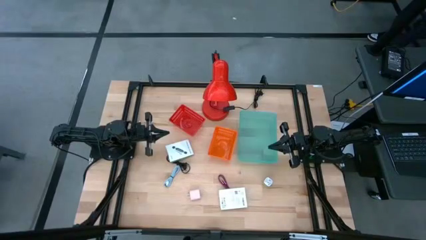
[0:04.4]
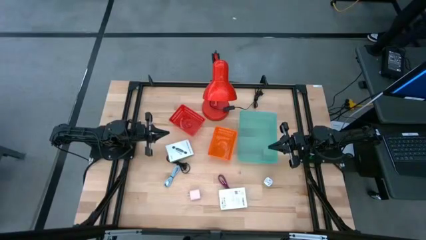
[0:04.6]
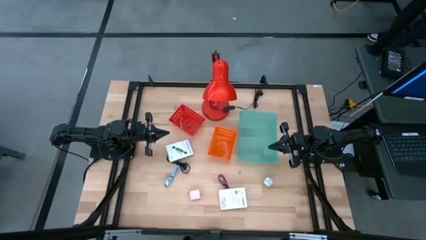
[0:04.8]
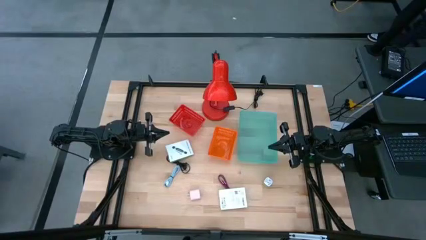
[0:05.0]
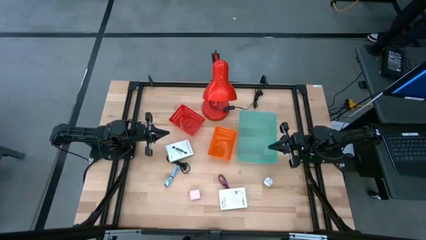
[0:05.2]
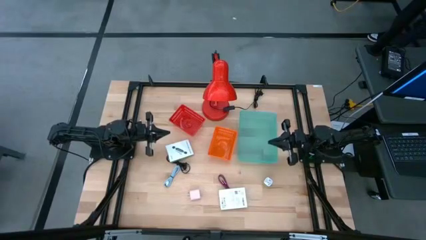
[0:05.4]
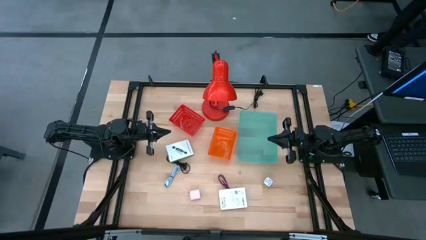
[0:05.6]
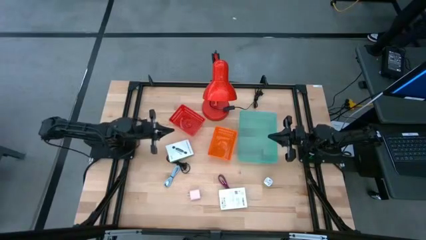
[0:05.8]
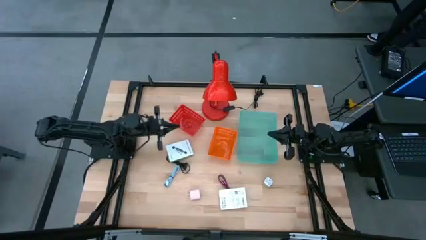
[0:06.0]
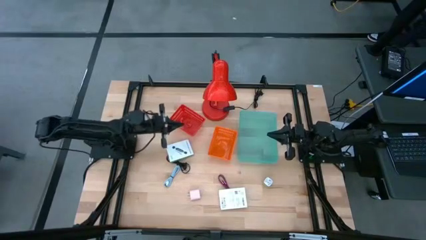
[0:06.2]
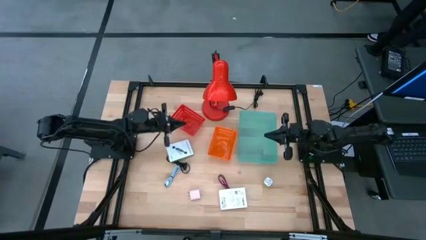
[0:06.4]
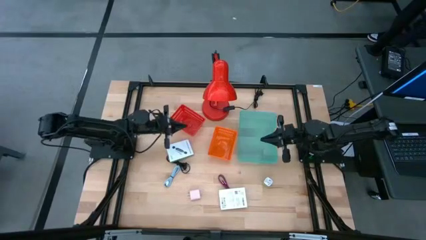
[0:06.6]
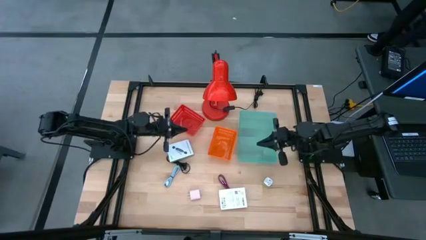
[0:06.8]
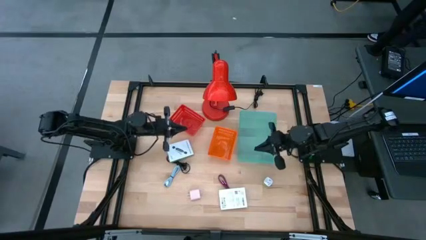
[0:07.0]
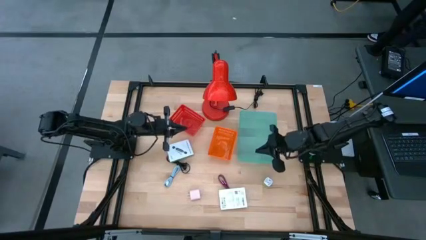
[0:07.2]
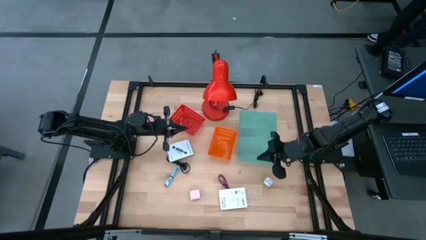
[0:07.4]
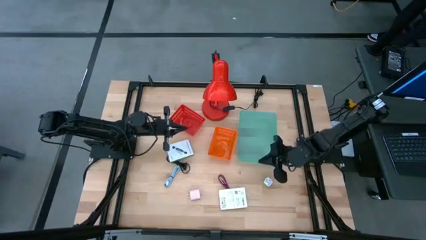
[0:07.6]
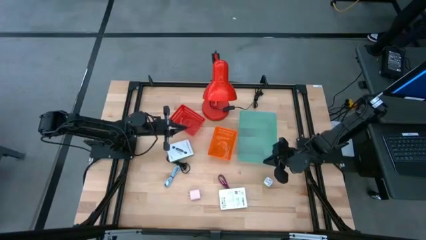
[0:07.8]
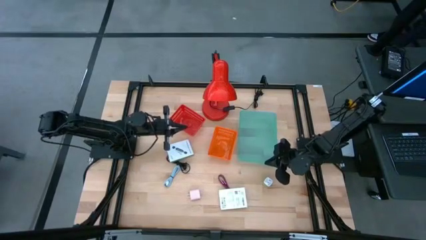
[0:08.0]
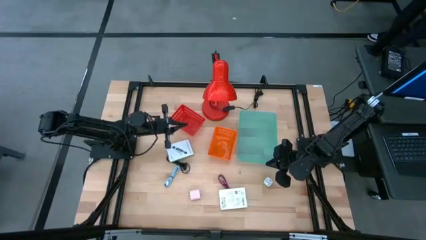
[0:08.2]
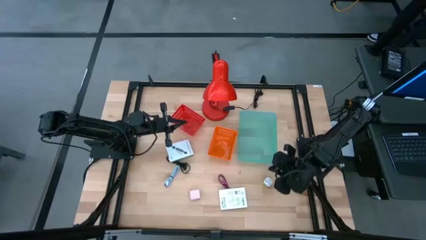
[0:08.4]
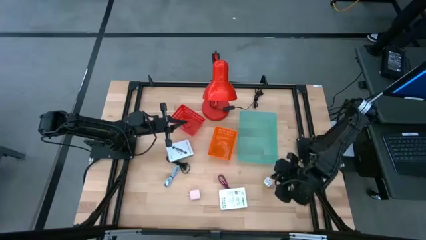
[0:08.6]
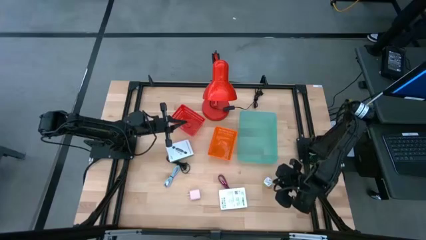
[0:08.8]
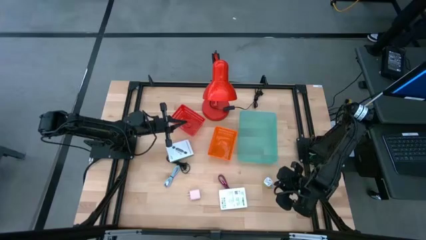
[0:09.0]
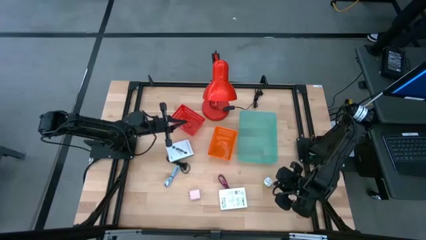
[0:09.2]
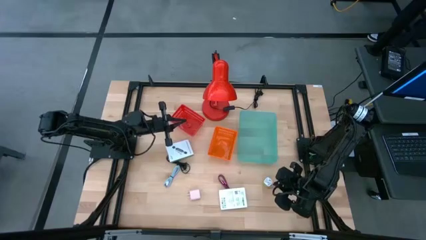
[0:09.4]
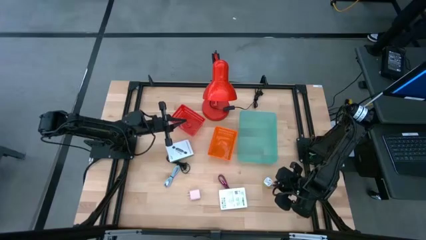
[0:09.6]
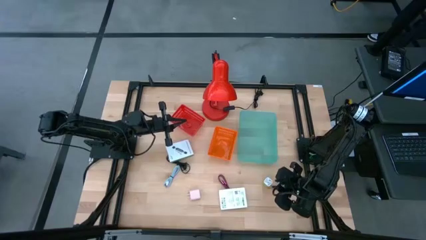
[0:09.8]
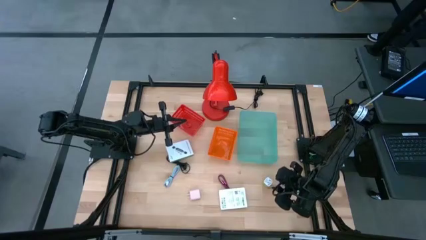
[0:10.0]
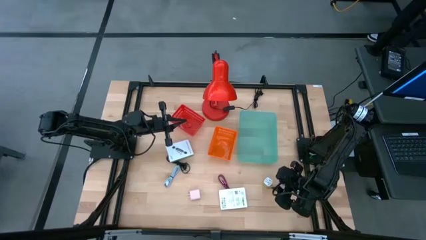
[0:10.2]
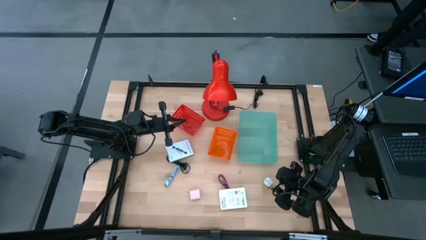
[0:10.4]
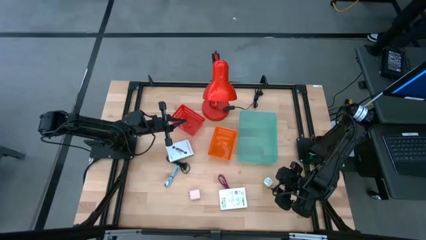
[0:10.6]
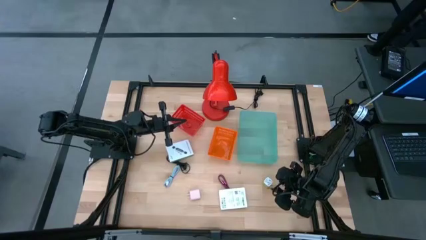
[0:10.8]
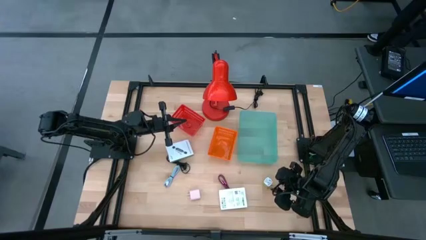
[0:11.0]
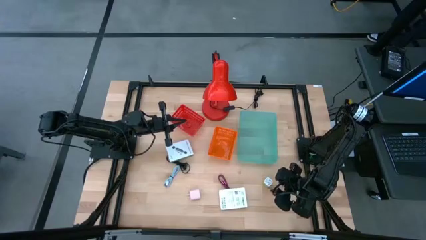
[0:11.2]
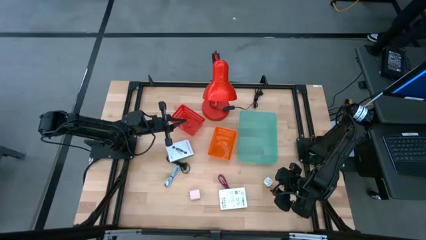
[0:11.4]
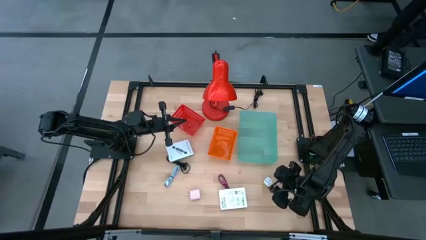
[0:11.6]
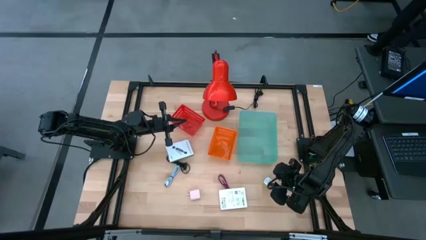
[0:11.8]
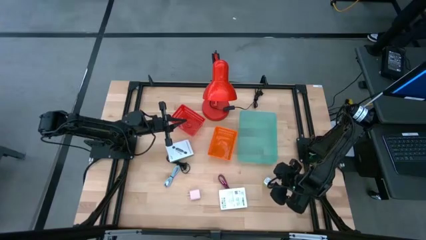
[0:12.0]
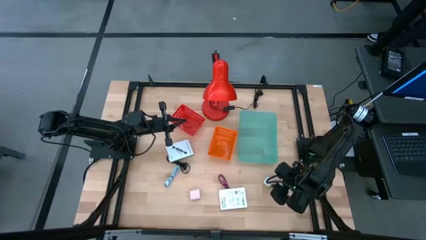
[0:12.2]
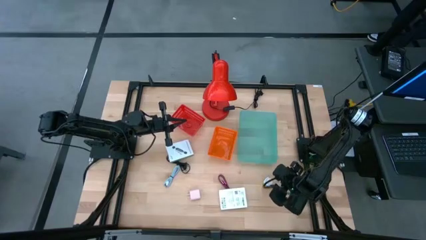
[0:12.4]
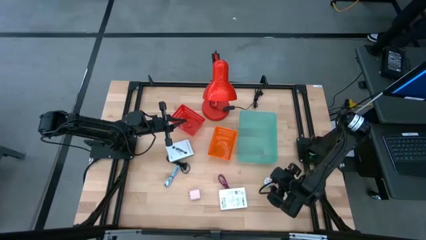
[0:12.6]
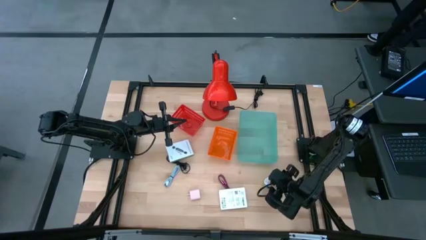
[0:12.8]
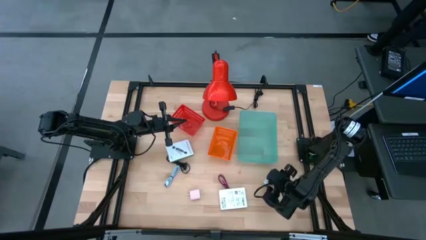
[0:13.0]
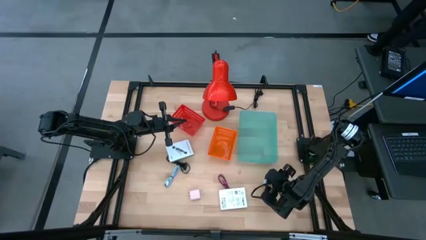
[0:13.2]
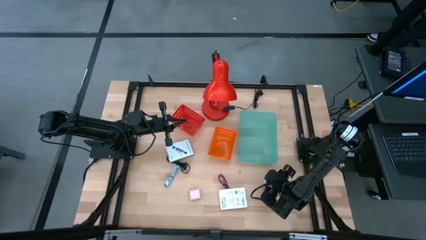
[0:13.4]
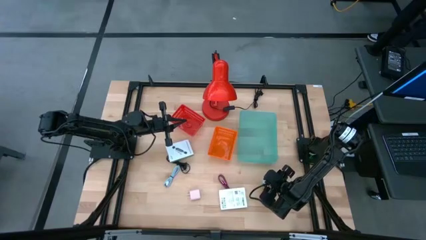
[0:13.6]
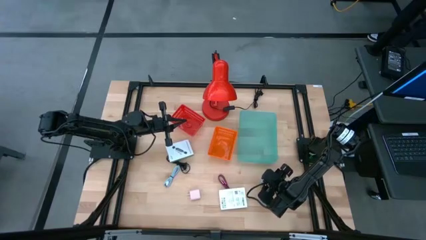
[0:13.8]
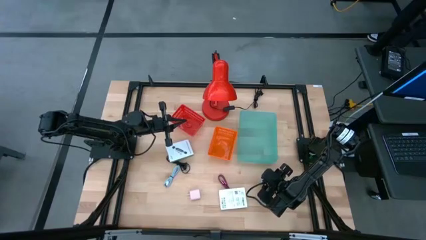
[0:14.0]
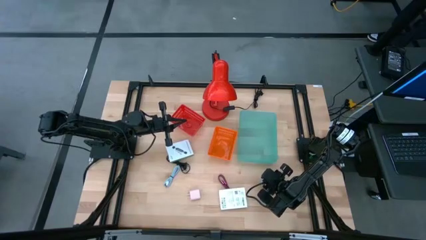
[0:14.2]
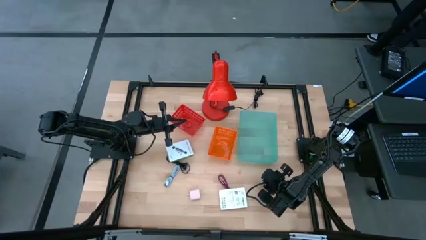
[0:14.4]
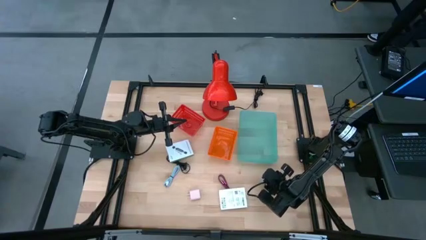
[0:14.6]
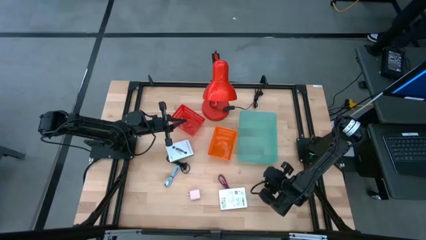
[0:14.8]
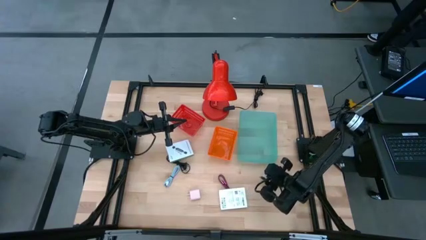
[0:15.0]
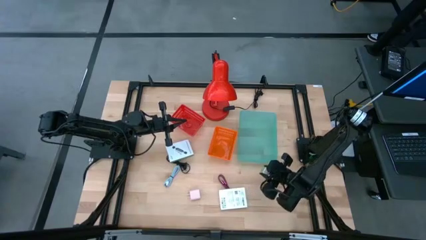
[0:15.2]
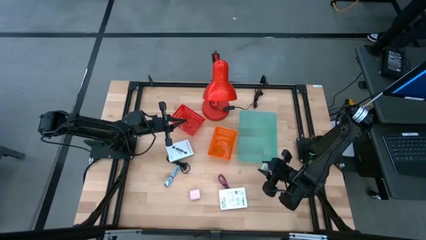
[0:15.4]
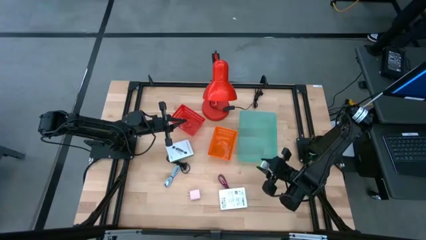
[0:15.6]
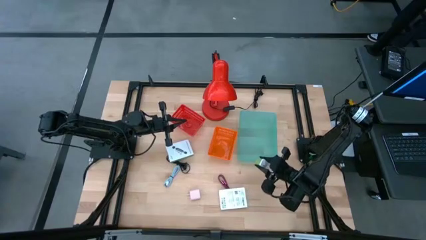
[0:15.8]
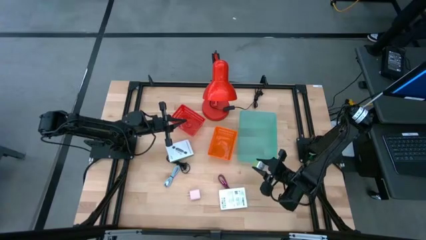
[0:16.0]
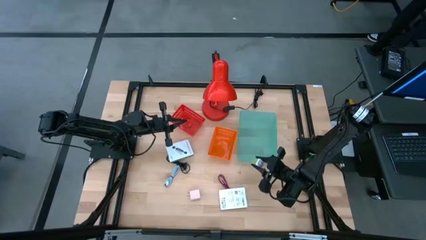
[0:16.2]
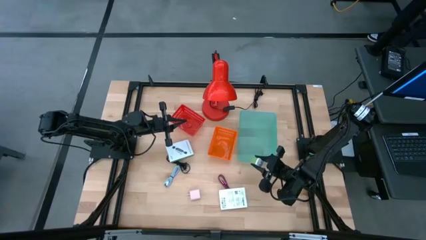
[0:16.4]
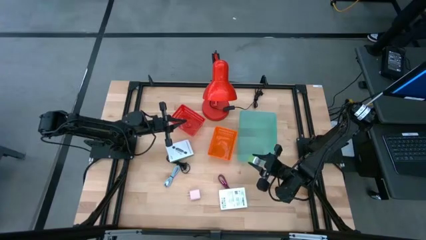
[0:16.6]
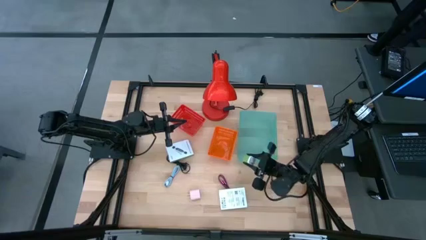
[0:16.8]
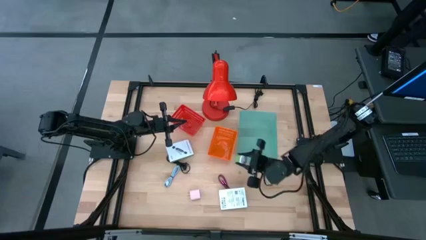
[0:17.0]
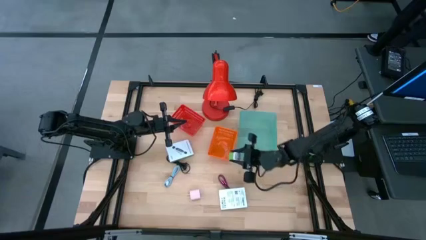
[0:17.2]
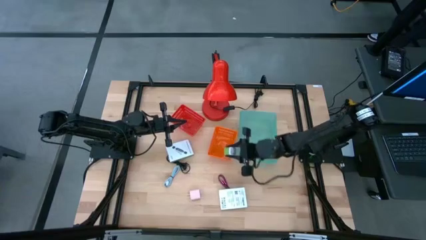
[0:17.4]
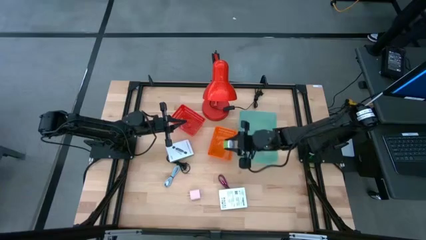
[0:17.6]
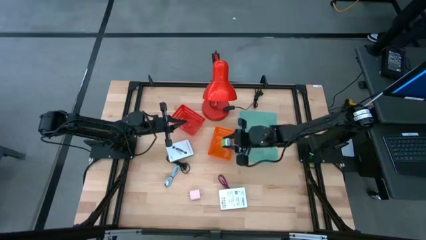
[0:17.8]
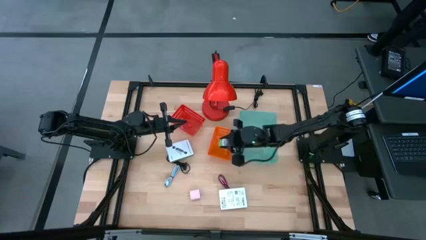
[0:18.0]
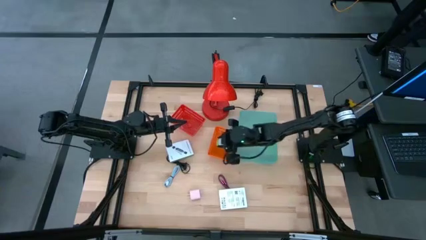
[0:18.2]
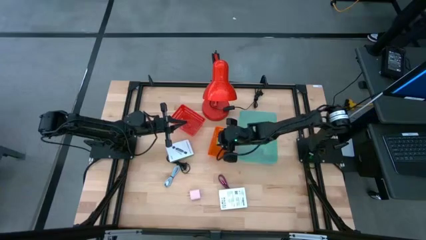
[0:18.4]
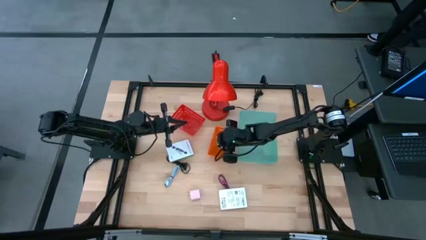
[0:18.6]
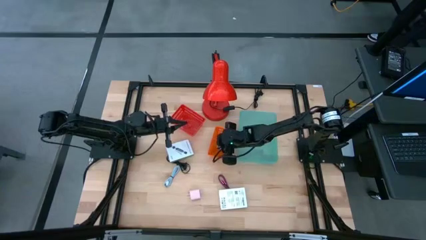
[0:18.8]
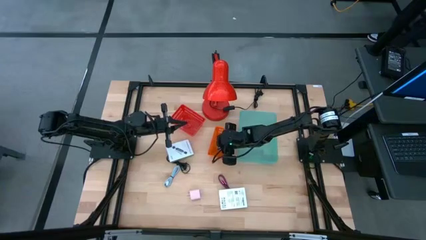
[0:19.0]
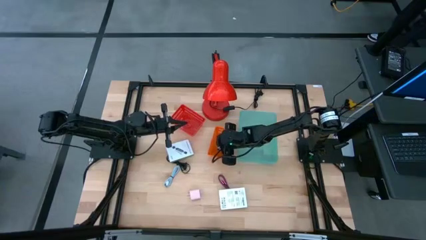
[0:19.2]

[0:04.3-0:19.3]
Task: Pick and place items into bin
Put the green charger adapter into the orange bin
